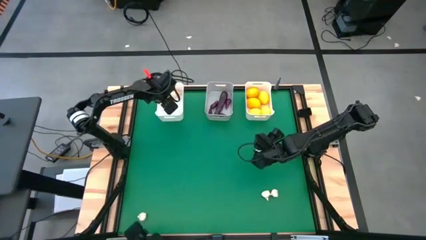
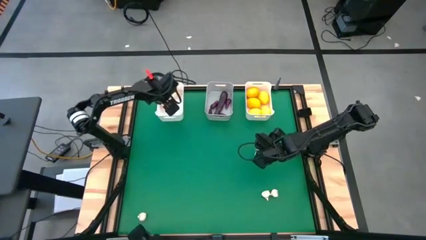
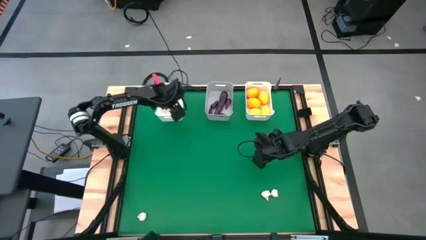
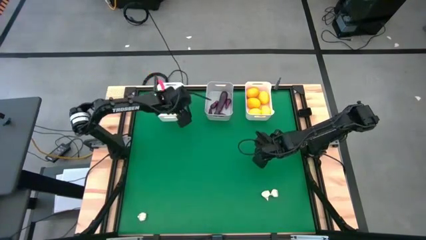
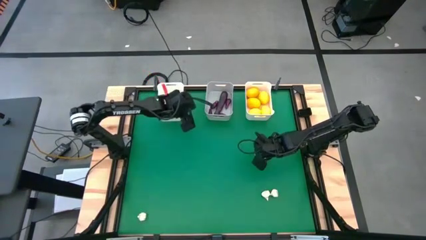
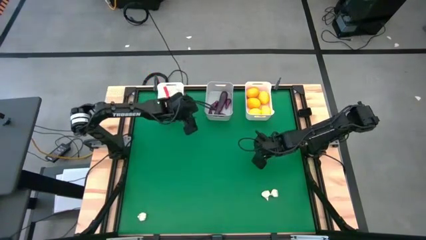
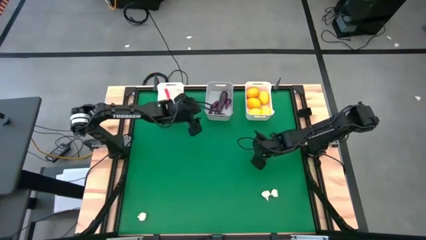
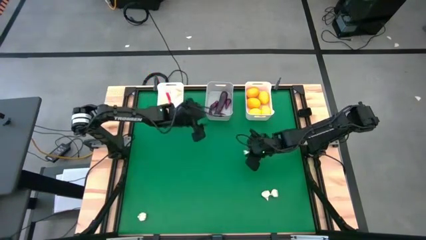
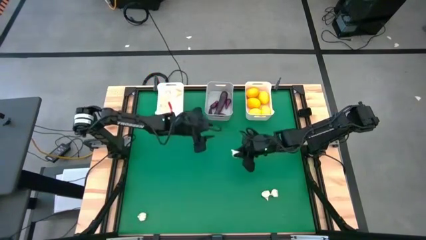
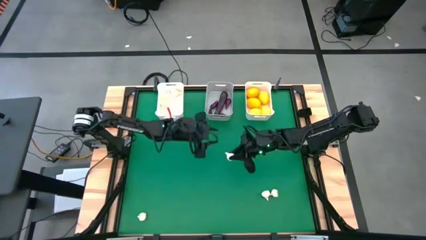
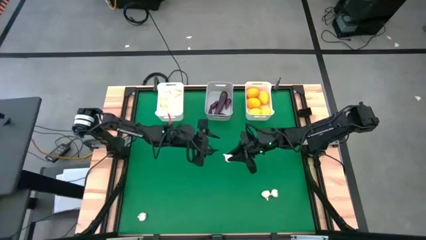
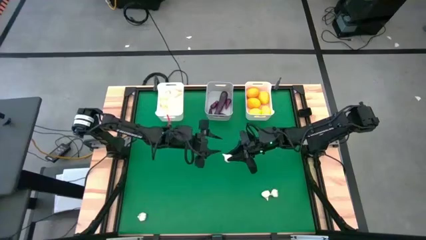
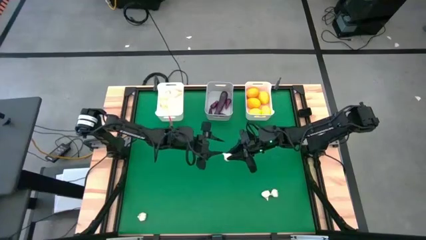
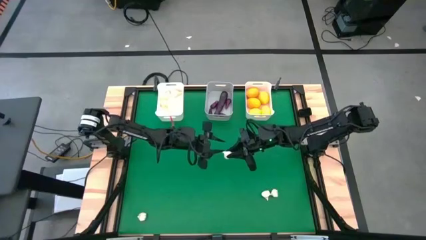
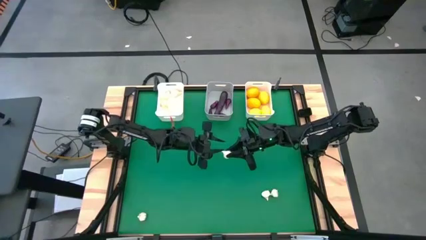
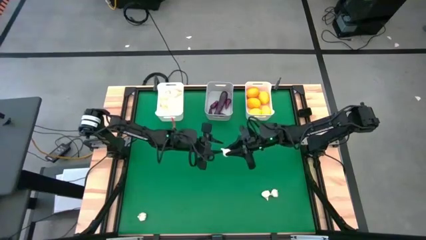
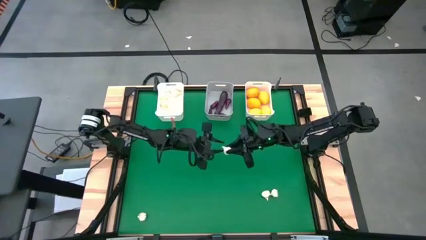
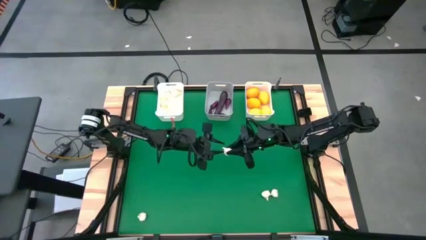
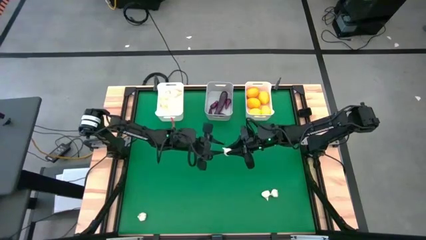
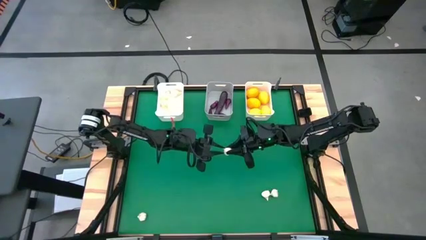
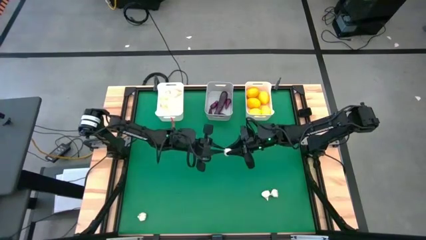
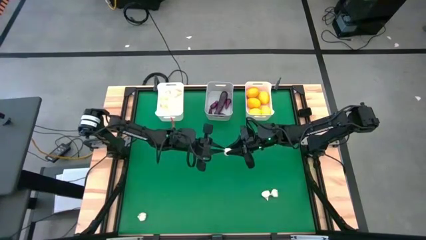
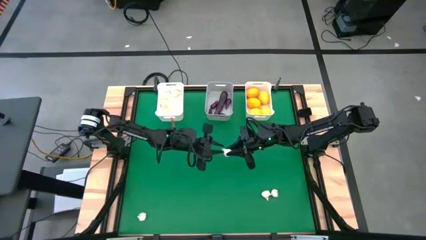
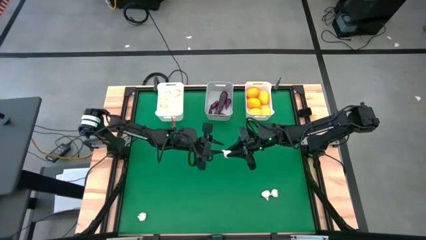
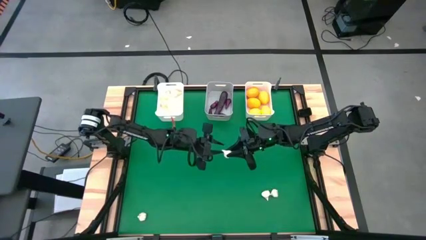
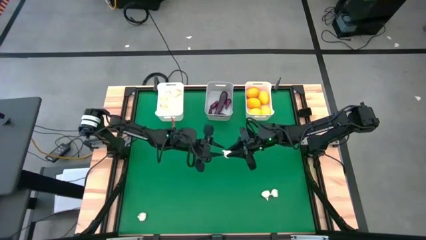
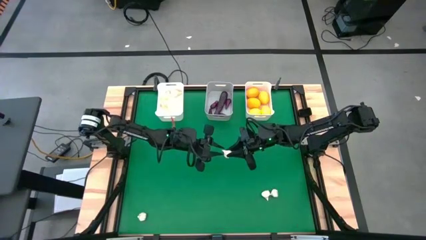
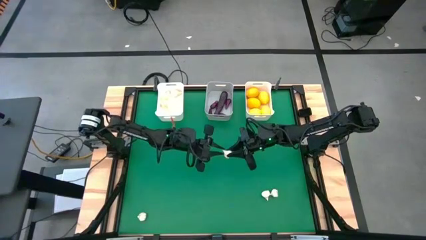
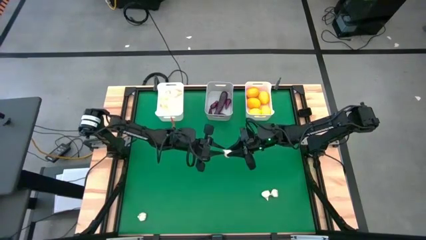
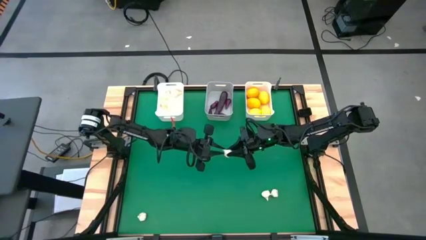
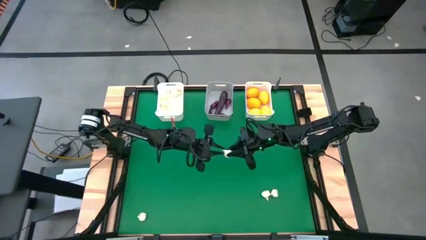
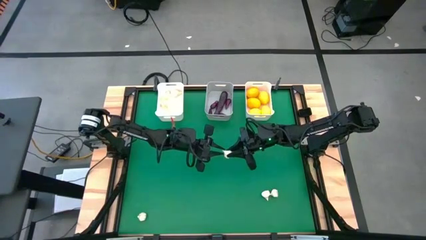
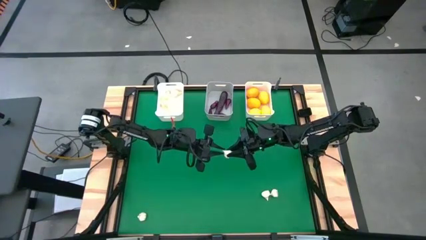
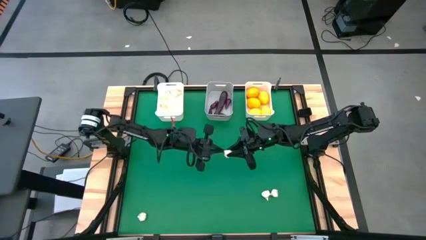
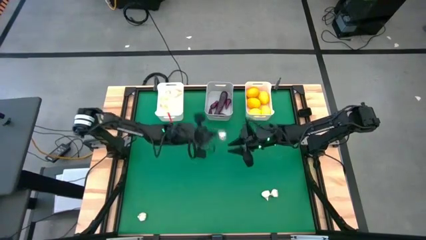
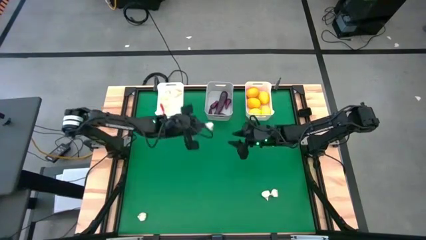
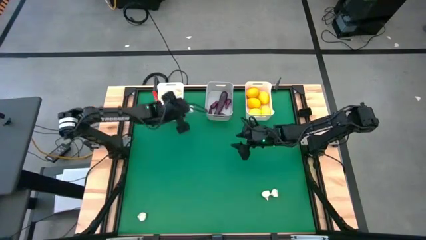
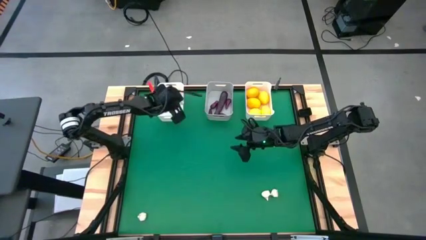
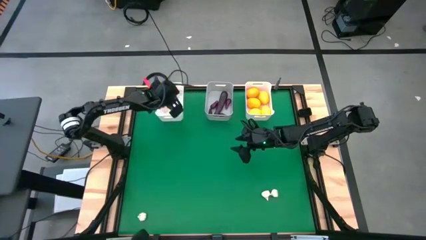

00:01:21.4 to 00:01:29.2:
Task: Sort produce into baskets
Put the garlic into the left white bin

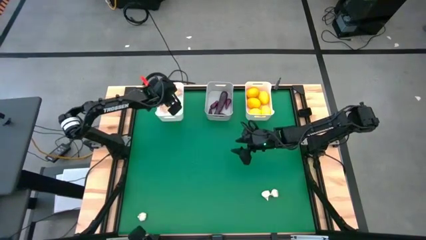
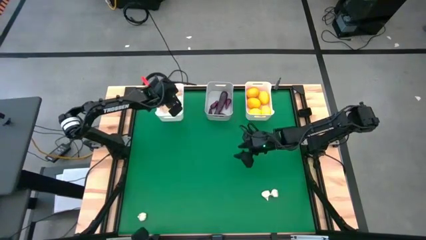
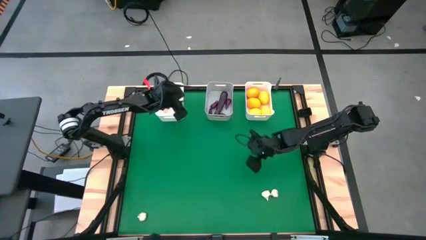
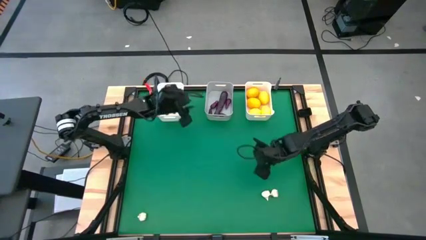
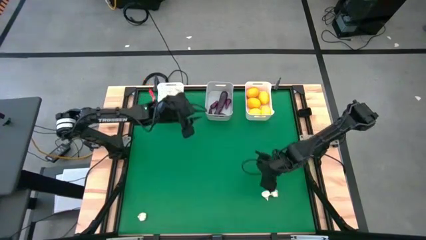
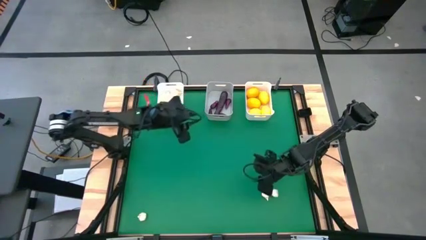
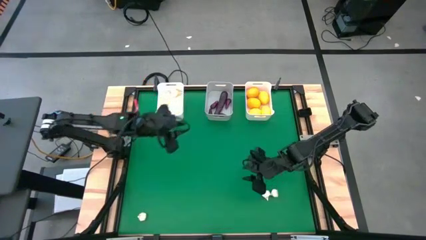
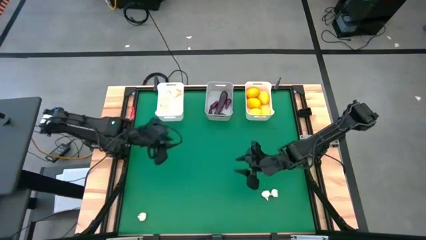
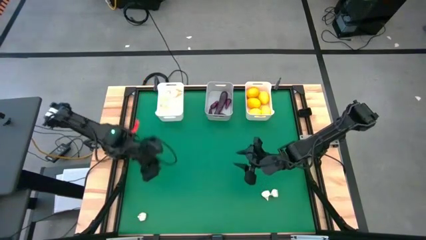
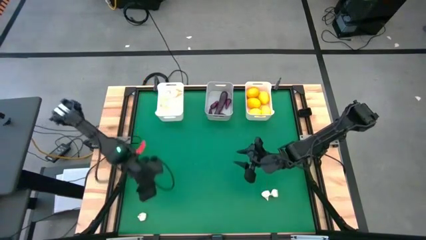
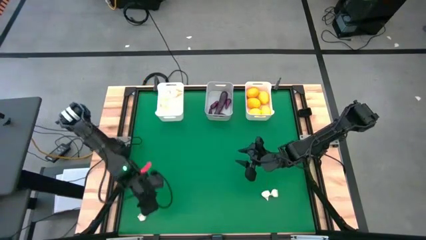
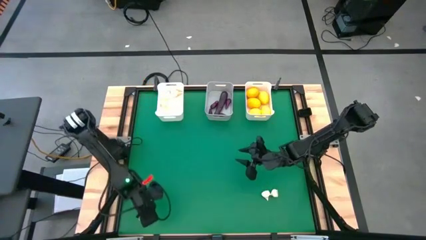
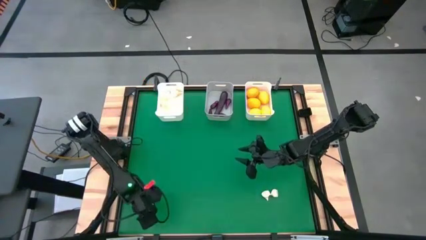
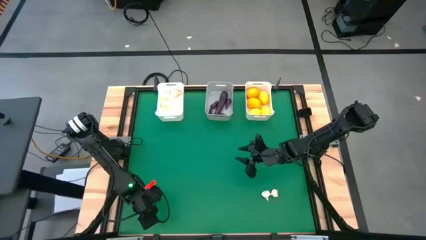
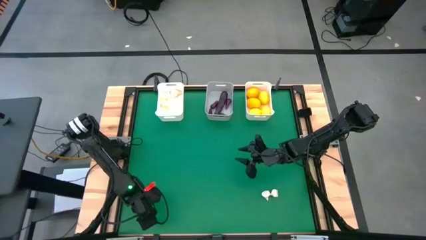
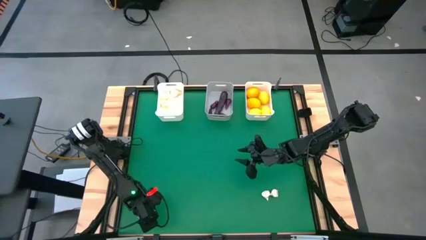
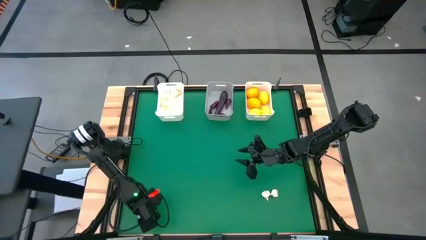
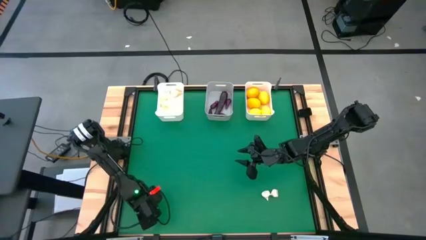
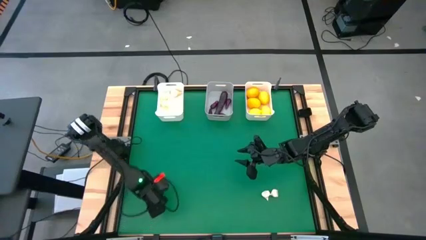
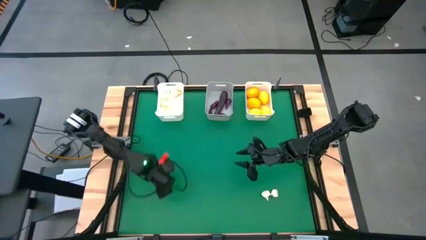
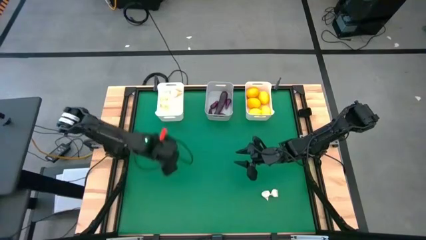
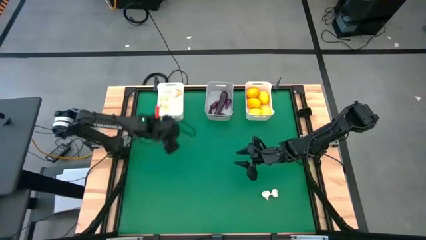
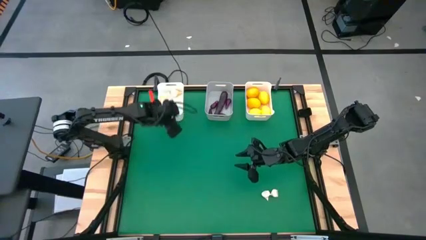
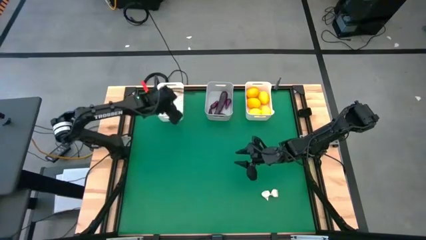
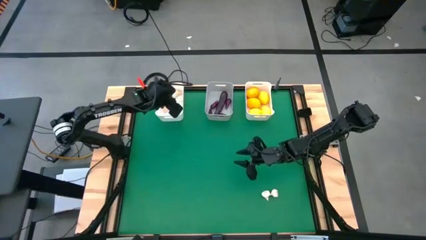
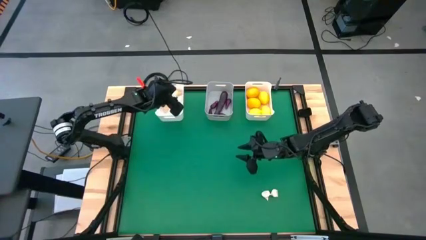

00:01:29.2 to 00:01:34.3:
Put the garlic into the left white bin

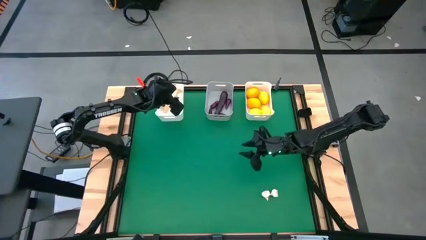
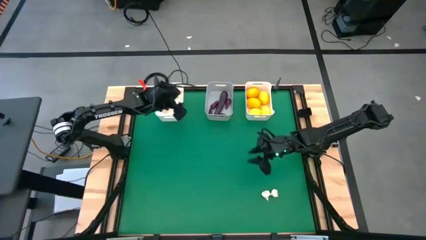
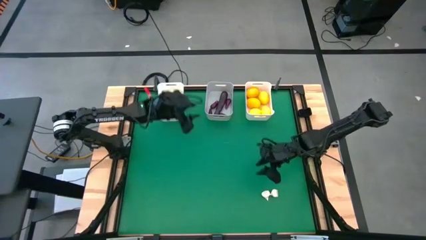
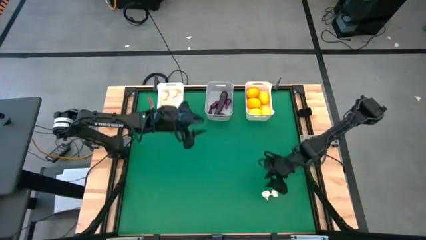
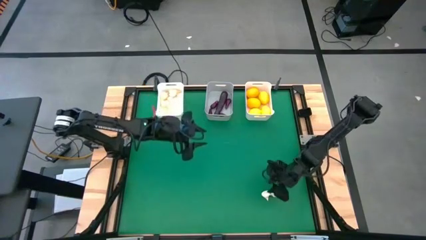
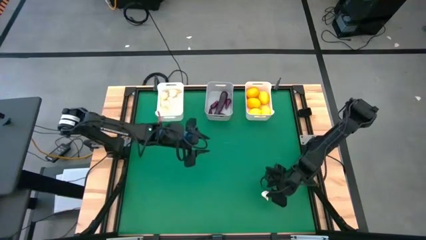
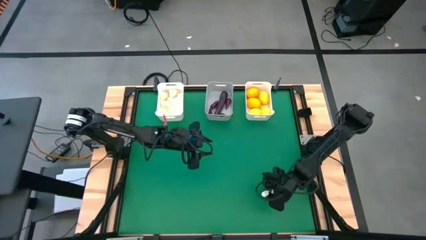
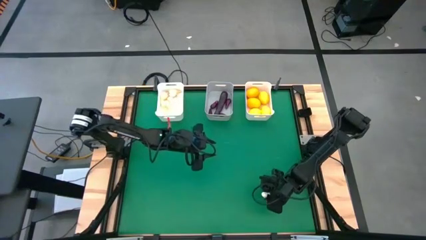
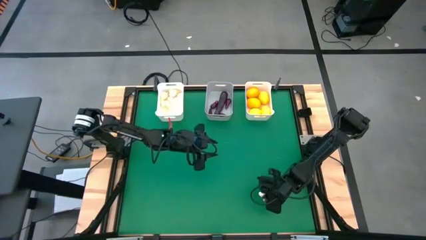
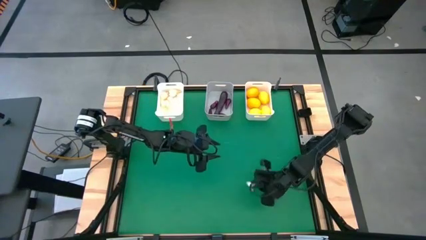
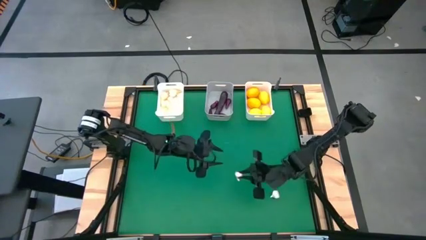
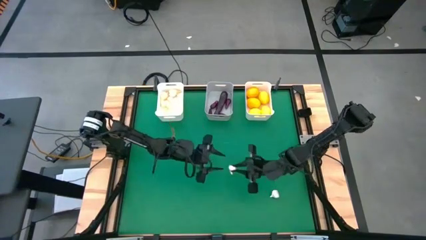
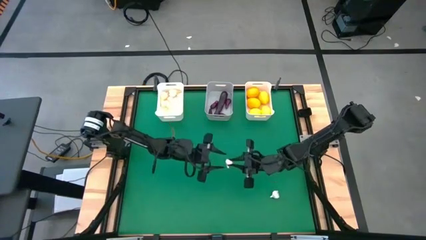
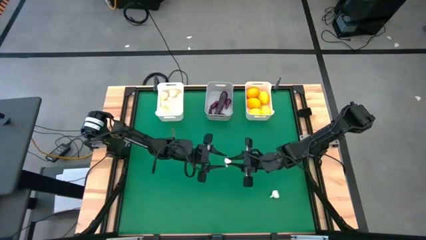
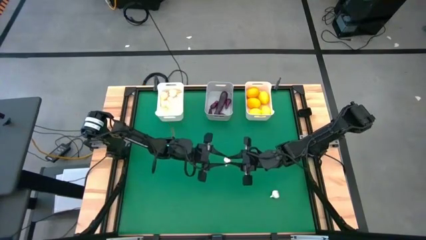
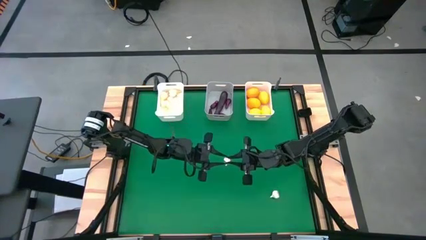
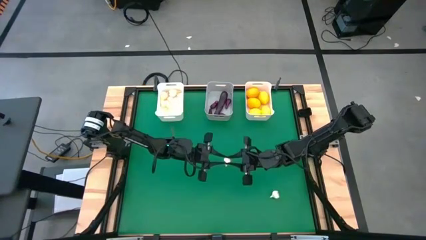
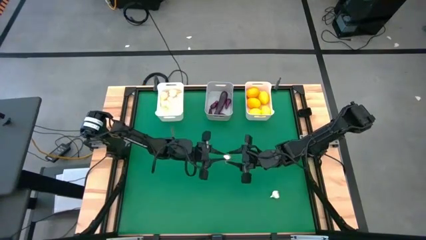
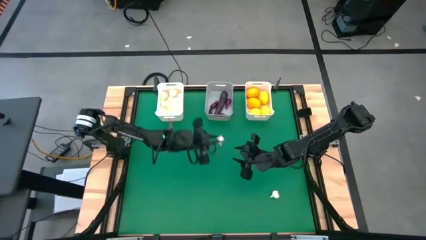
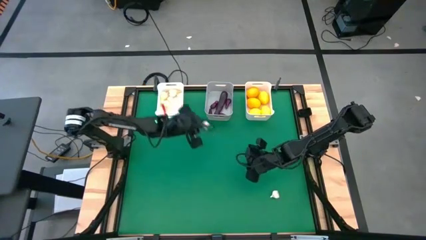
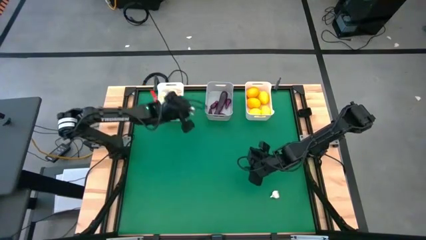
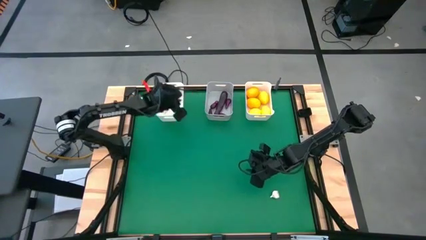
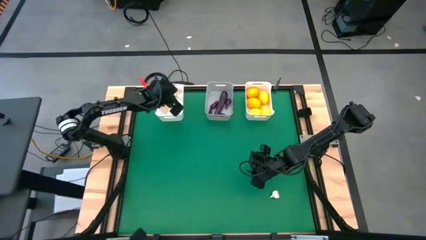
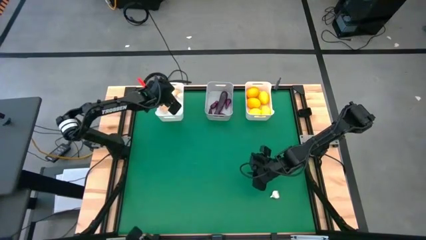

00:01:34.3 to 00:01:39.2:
Put the garlic into the left white bin

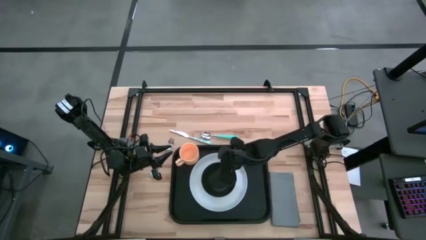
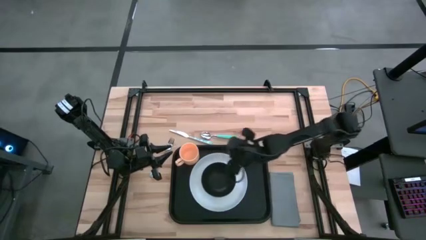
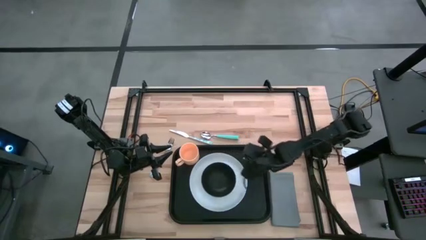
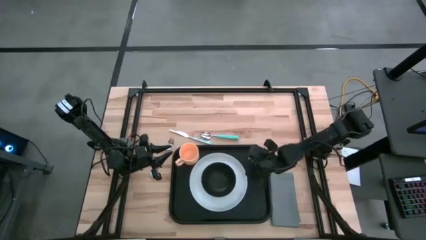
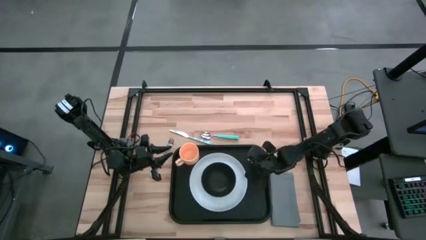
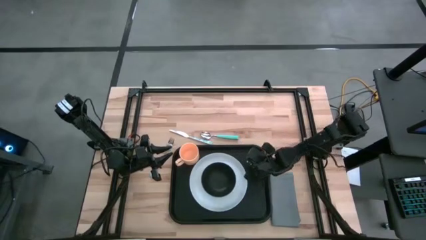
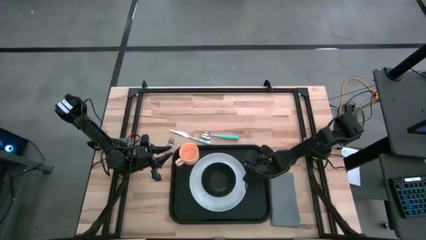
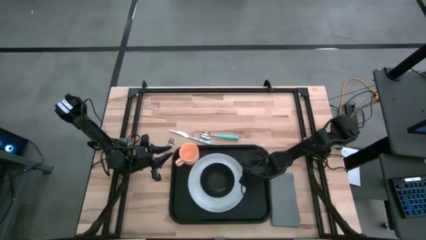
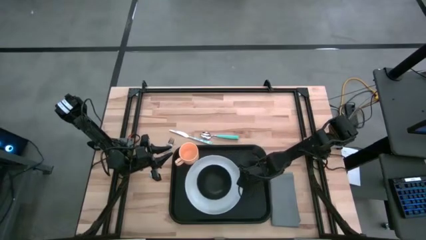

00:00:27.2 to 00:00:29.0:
Task: Set up tray
Adjust the white plate on the black tray
